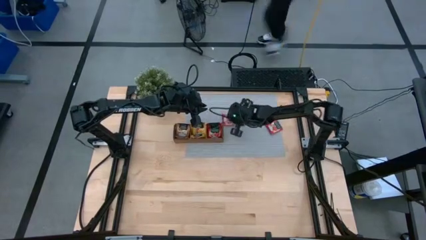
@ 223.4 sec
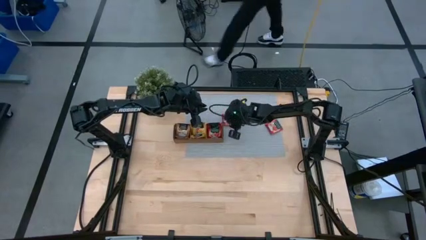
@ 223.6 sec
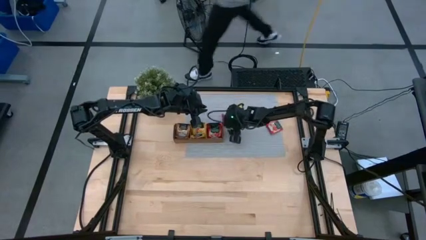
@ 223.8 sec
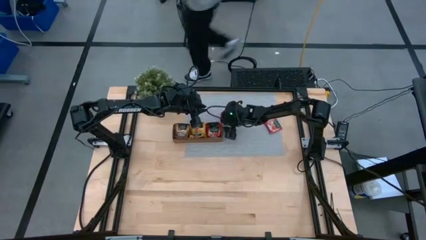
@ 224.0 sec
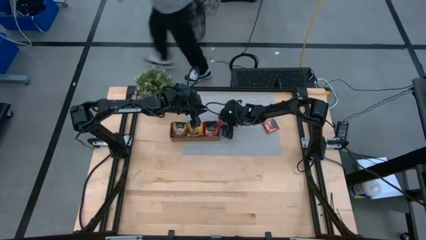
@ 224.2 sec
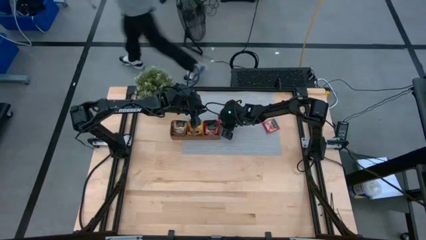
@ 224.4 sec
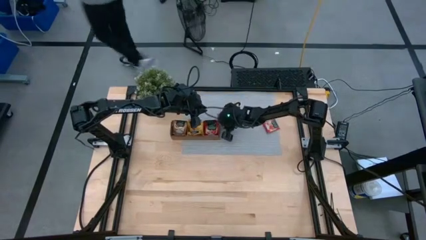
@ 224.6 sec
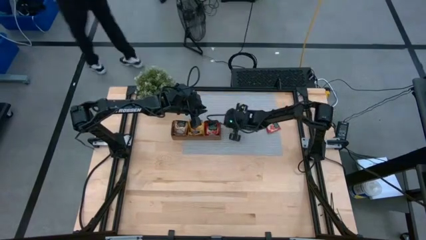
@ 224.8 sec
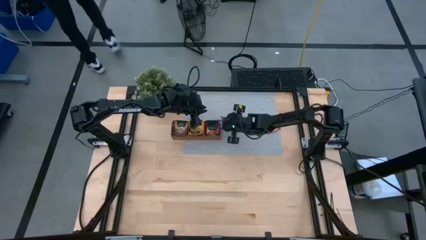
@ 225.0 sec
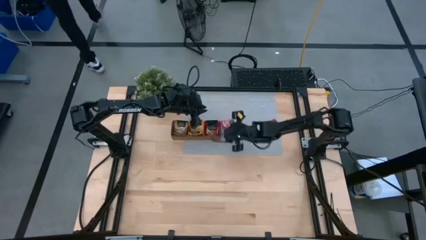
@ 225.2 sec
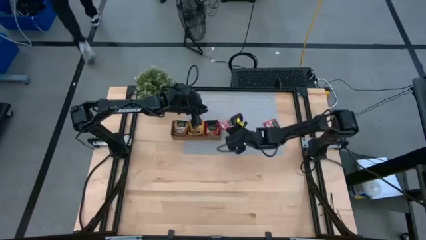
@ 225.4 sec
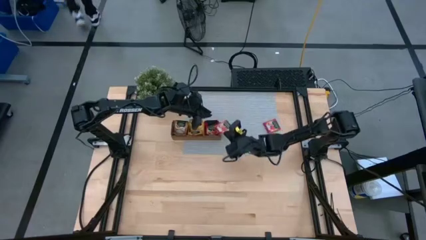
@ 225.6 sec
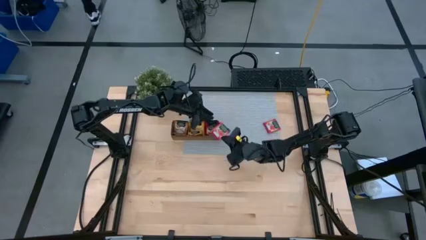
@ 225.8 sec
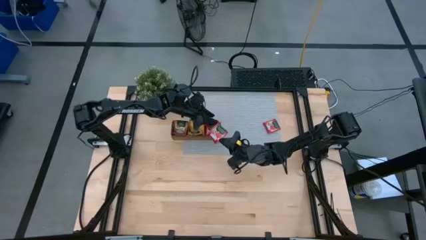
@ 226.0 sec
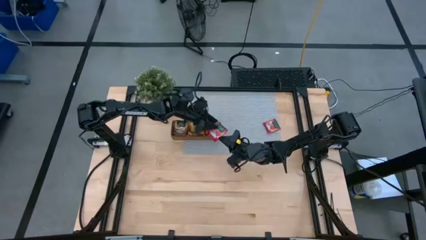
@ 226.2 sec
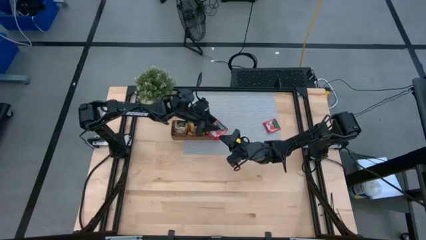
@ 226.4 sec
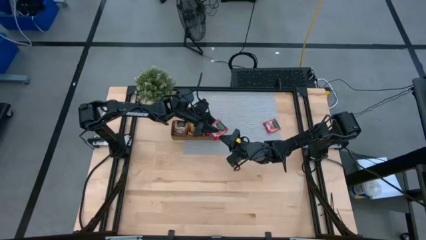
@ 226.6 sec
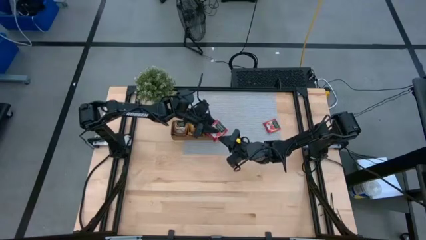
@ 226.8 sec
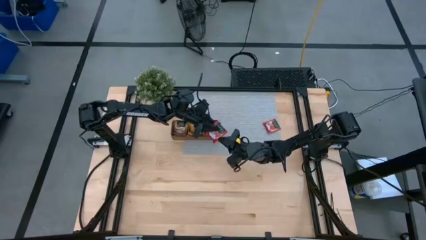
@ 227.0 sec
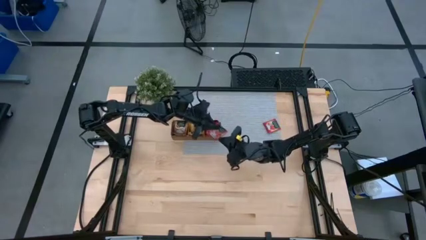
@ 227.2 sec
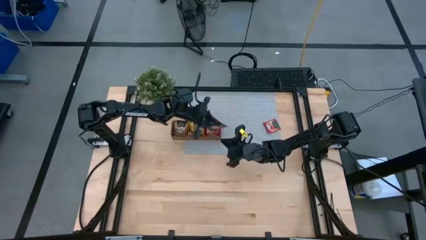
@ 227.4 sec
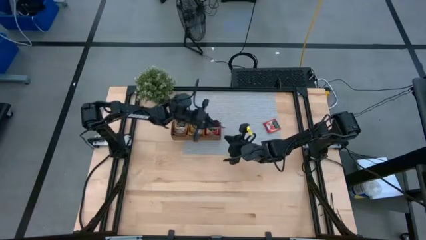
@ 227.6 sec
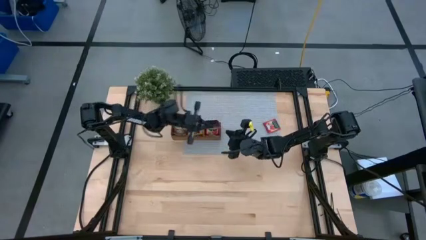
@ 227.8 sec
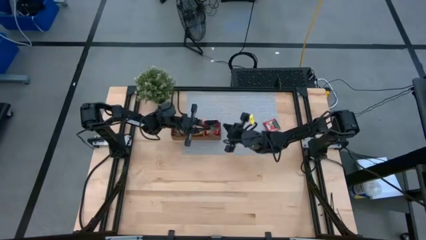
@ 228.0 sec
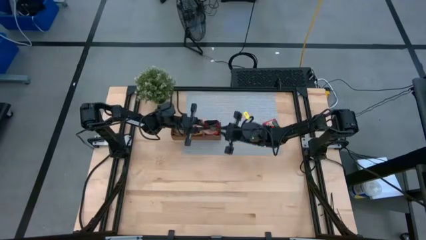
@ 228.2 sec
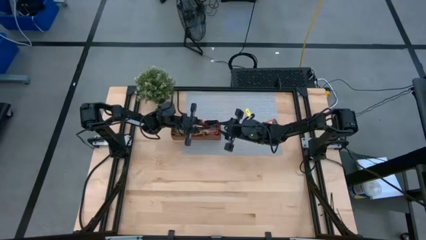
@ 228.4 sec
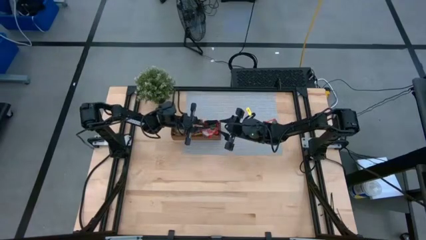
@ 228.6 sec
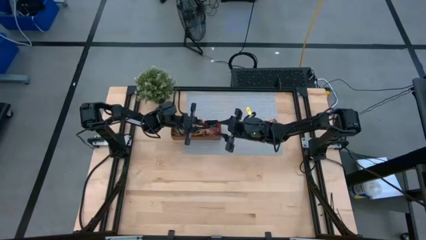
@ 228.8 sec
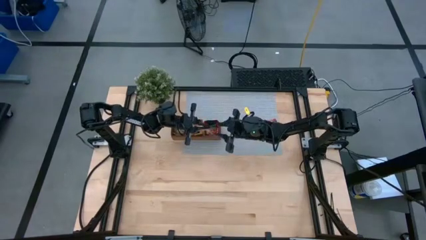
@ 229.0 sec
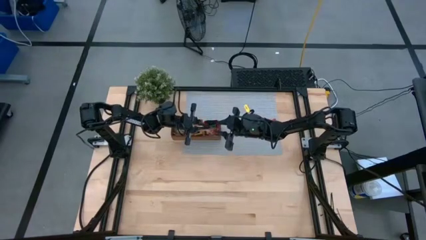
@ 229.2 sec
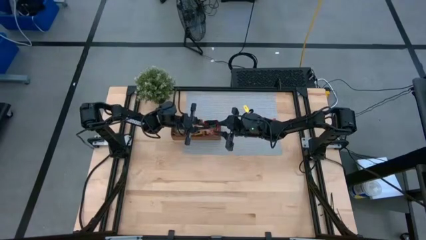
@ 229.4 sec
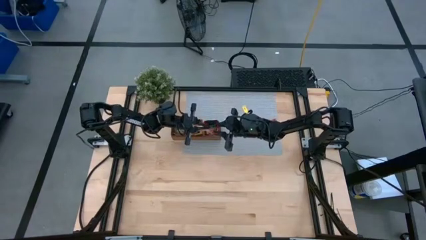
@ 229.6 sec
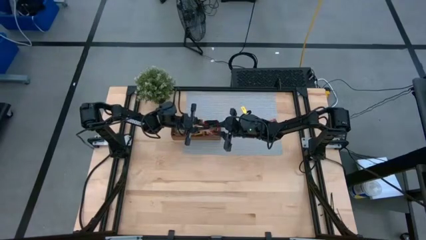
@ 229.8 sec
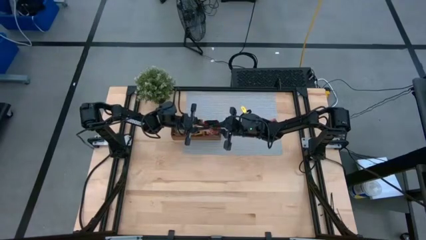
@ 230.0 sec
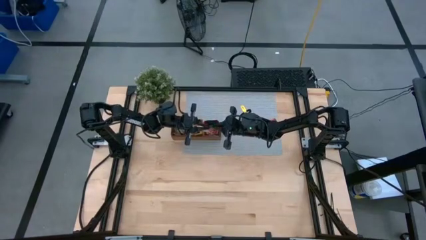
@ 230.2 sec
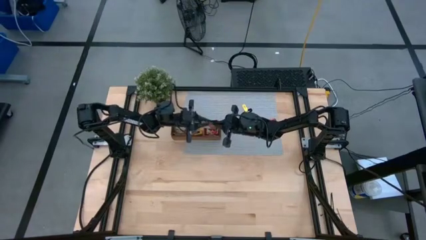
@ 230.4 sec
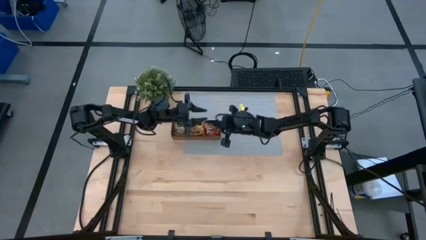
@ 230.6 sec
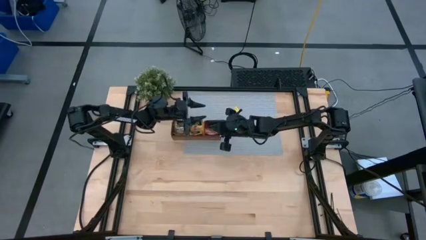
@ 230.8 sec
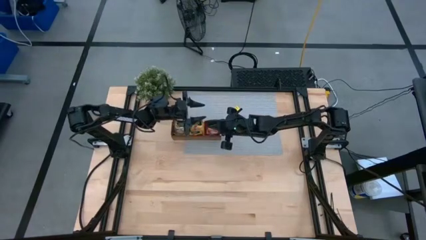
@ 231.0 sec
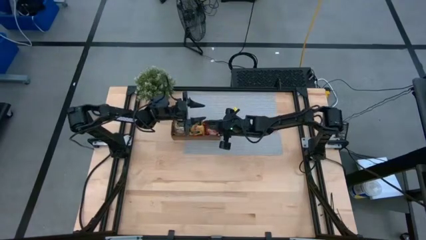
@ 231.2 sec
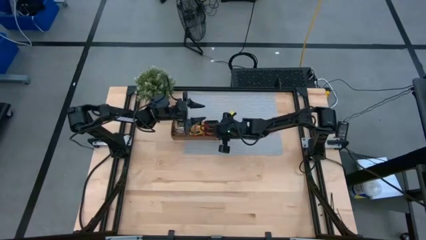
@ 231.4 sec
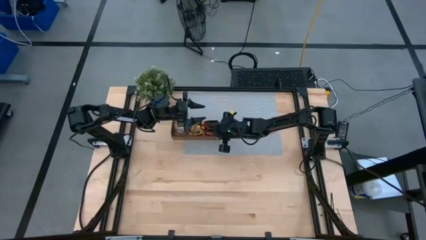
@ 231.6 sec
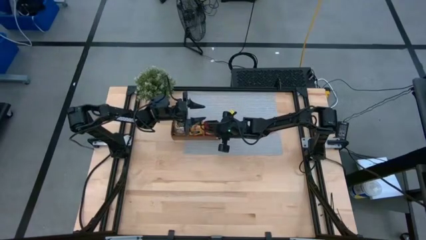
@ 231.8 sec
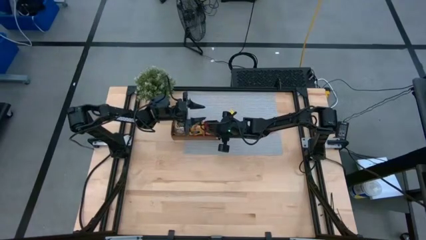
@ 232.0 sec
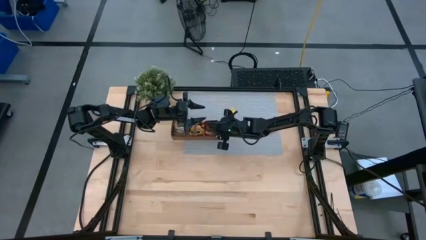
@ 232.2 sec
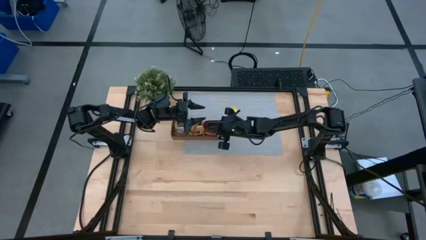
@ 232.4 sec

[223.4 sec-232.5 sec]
Task: Pick & Place Tea
Put the red tea bag into the right section of the wooden organizer

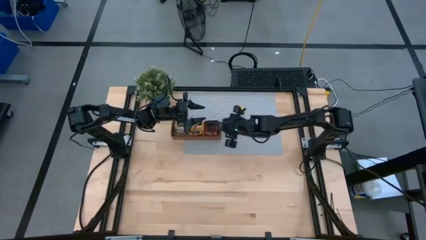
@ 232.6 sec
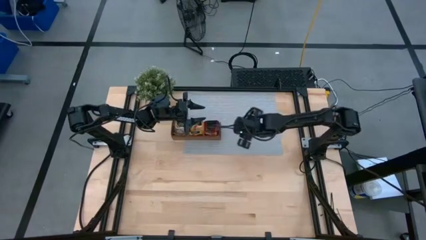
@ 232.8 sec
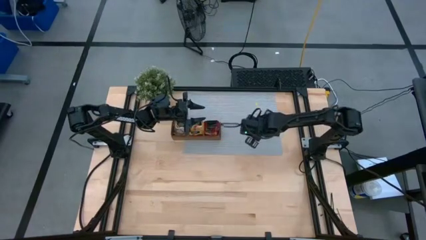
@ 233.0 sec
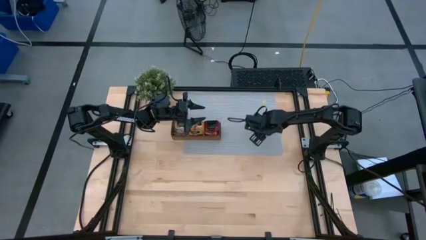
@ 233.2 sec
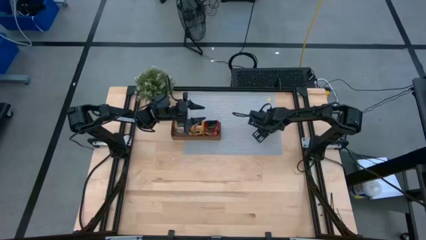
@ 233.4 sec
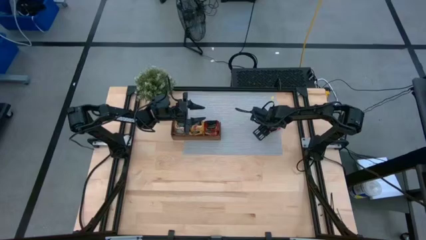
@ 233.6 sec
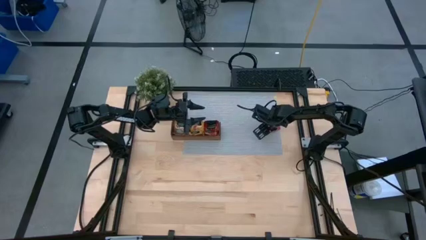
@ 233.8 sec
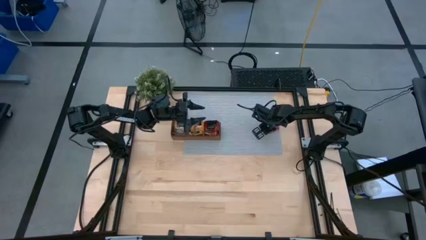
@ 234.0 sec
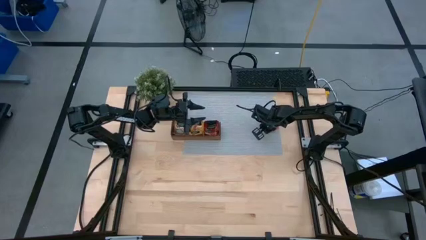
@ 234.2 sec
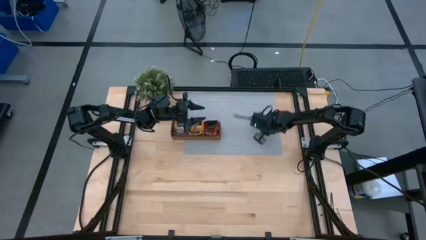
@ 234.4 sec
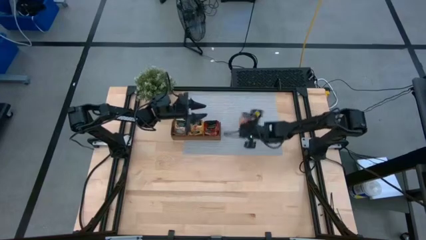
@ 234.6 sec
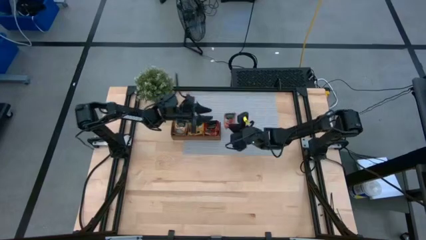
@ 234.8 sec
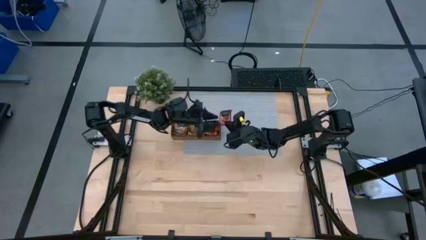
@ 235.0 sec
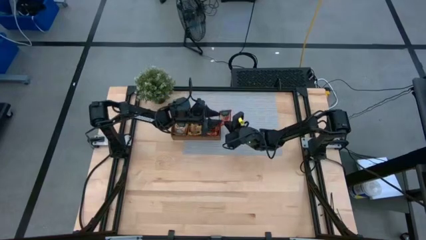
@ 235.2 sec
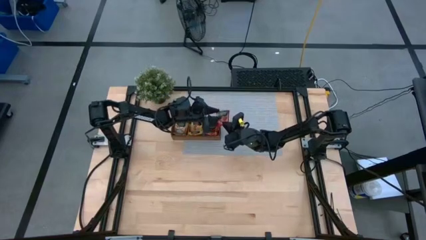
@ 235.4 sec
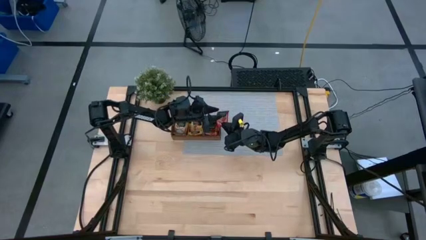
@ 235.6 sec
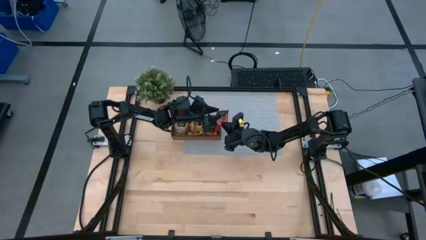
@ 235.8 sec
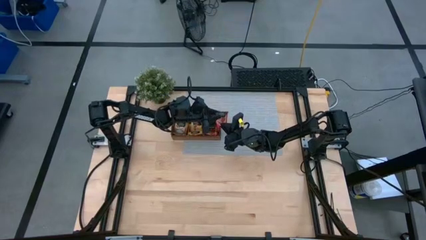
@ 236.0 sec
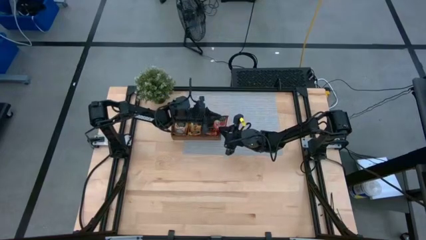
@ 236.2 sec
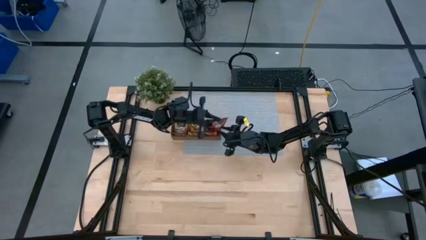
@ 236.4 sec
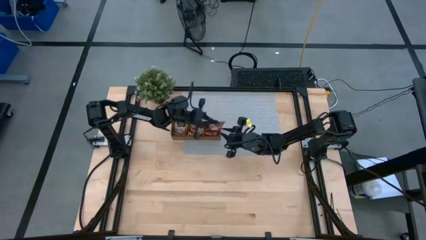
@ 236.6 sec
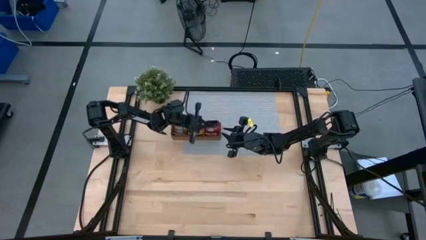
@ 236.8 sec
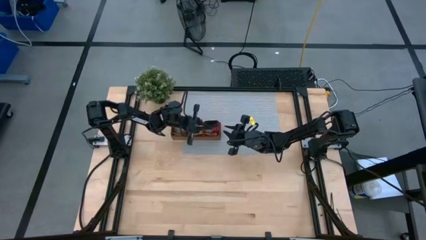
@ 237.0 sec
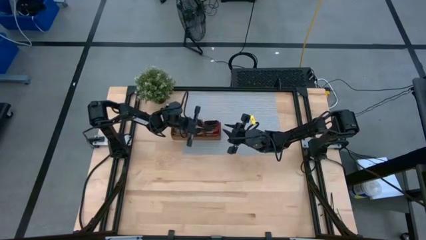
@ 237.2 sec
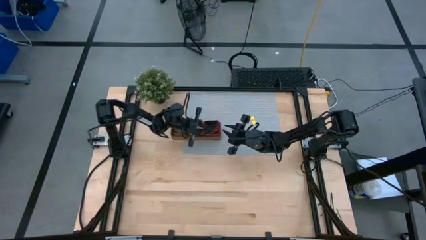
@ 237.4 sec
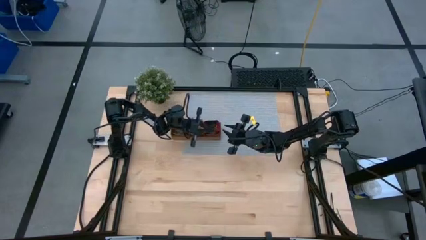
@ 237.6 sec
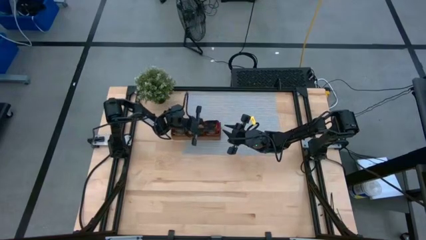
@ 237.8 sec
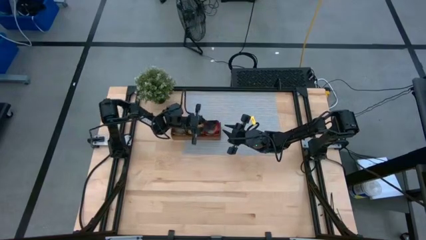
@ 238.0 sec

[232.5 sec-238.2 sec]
Put the red tea bag into the right section of the wooden organizer
